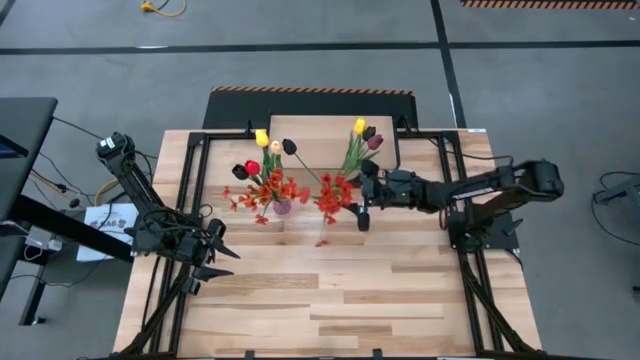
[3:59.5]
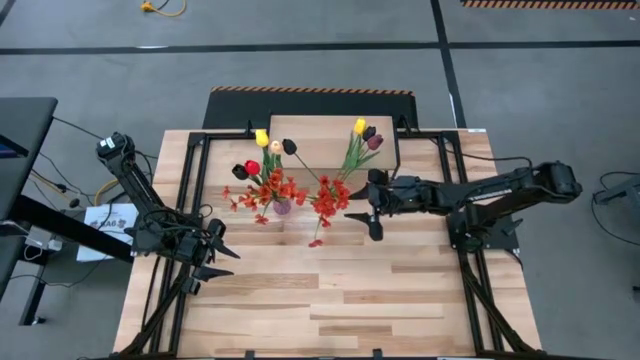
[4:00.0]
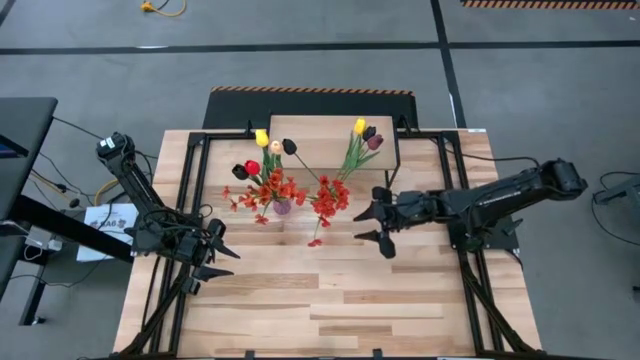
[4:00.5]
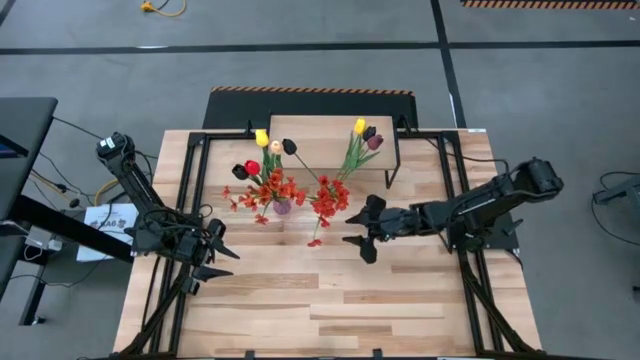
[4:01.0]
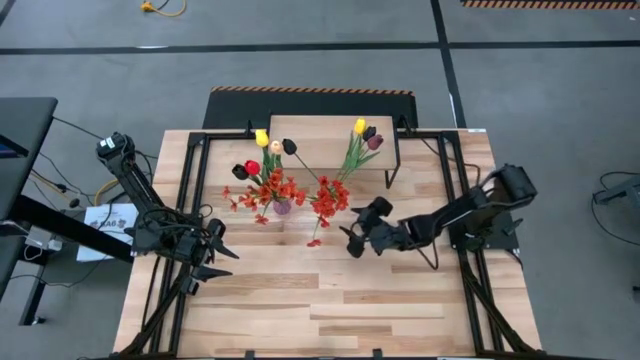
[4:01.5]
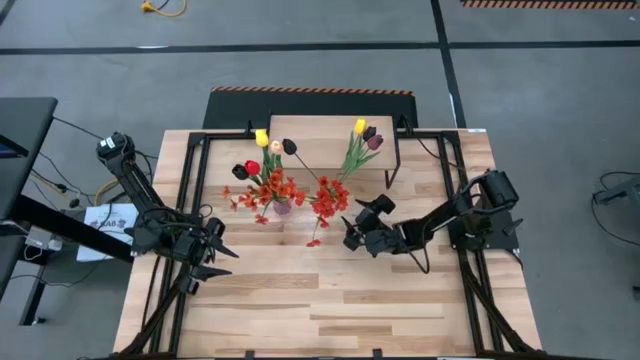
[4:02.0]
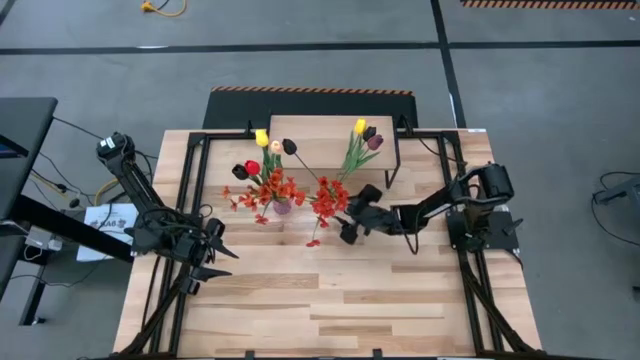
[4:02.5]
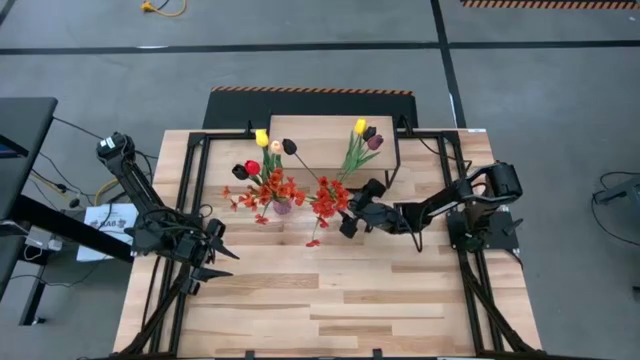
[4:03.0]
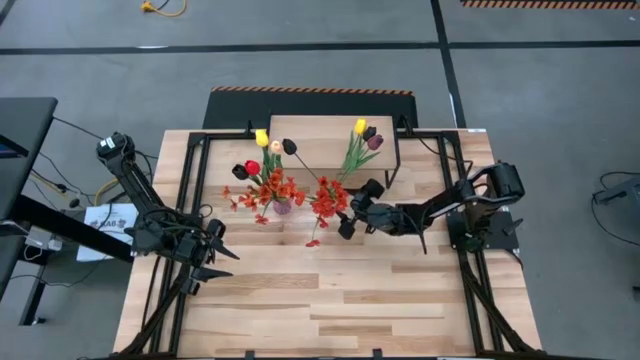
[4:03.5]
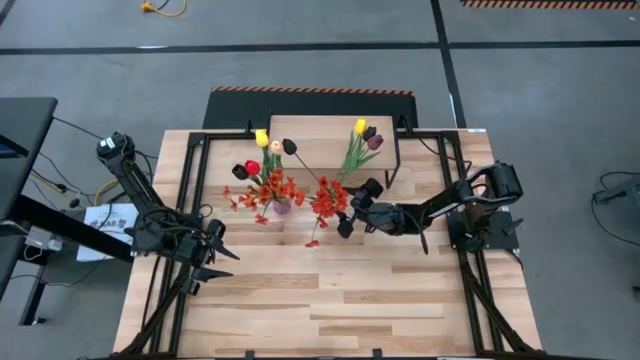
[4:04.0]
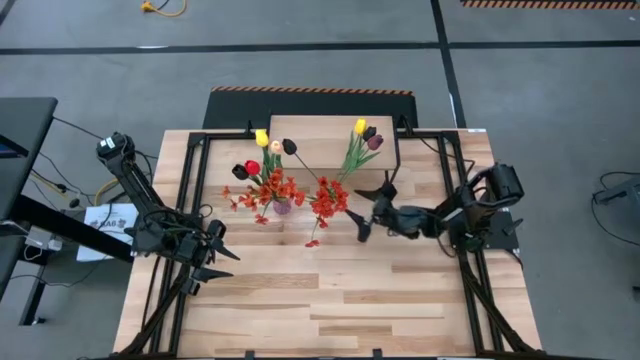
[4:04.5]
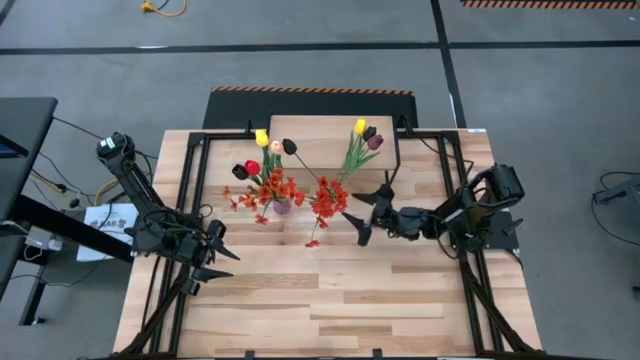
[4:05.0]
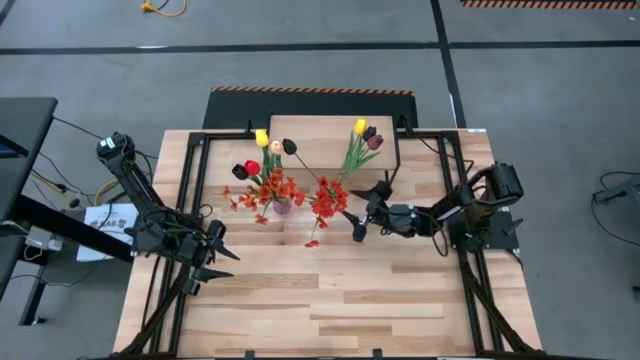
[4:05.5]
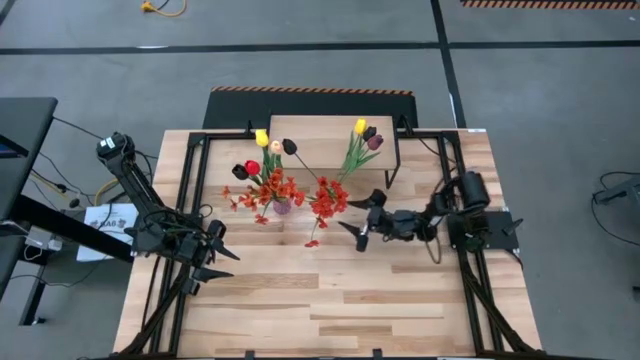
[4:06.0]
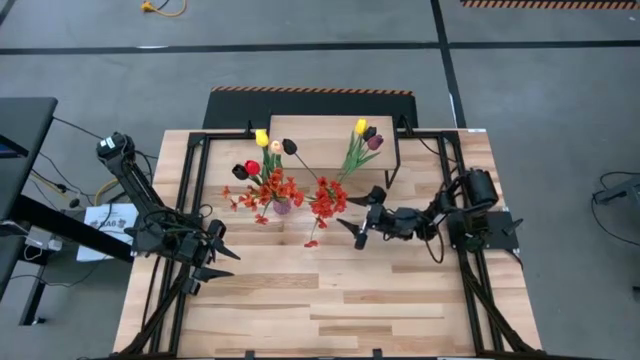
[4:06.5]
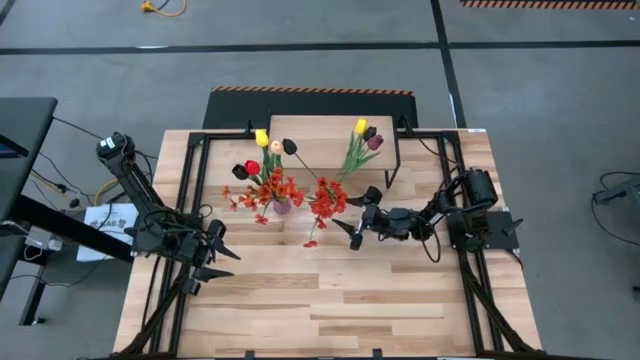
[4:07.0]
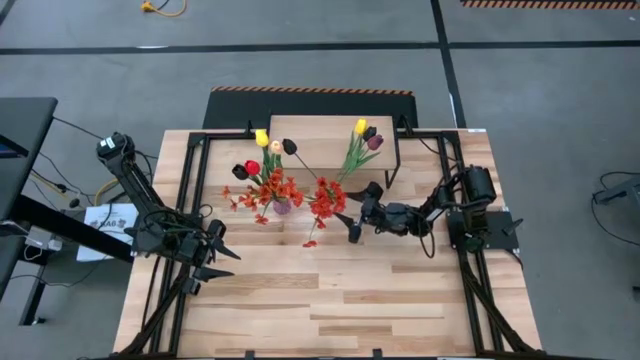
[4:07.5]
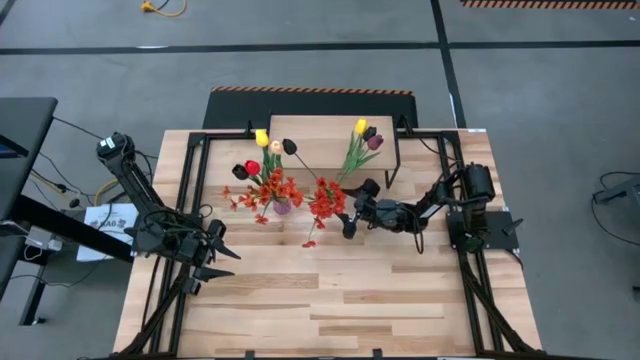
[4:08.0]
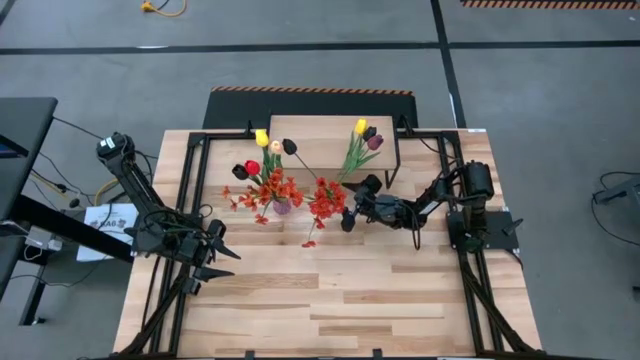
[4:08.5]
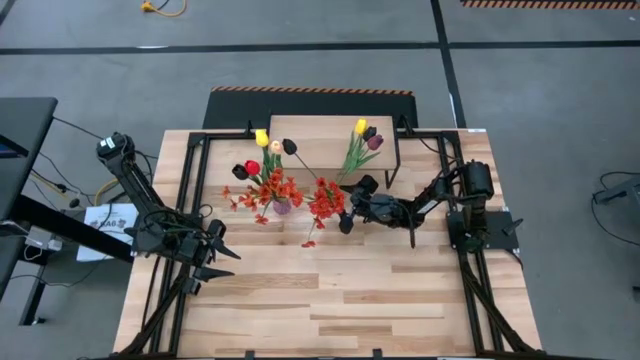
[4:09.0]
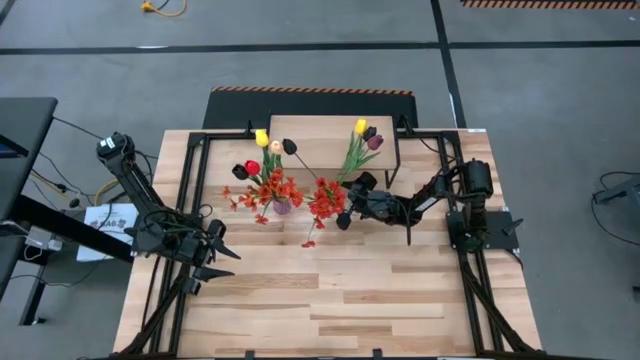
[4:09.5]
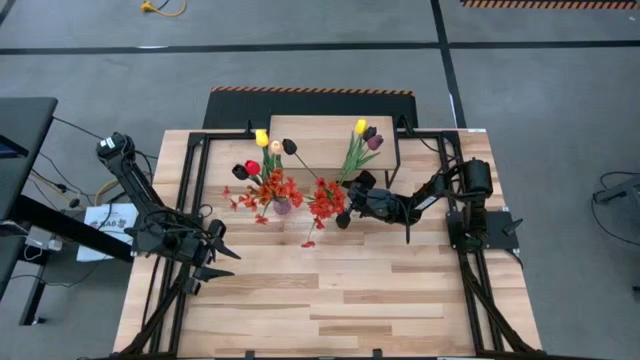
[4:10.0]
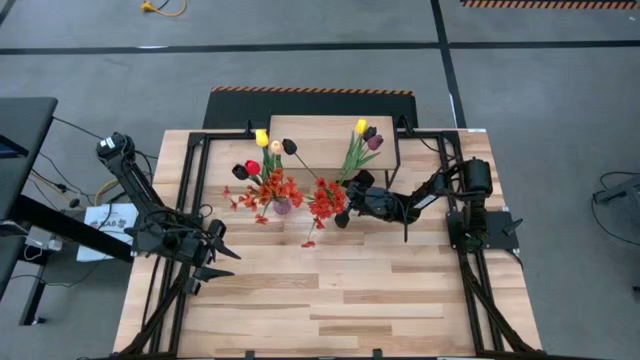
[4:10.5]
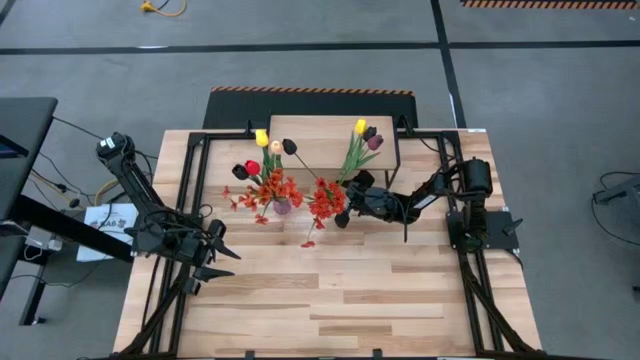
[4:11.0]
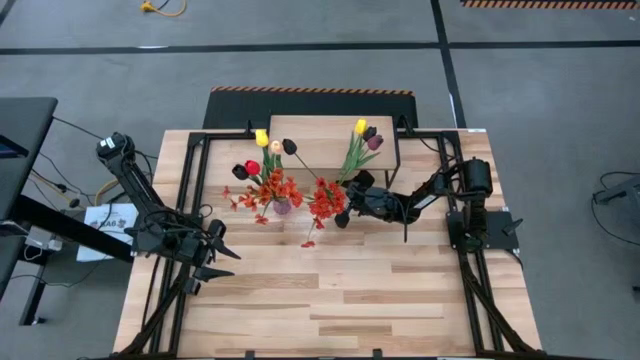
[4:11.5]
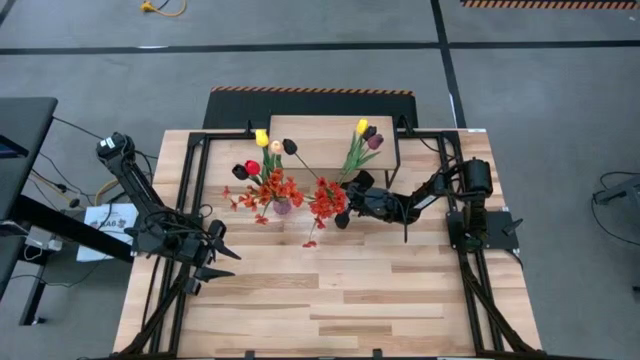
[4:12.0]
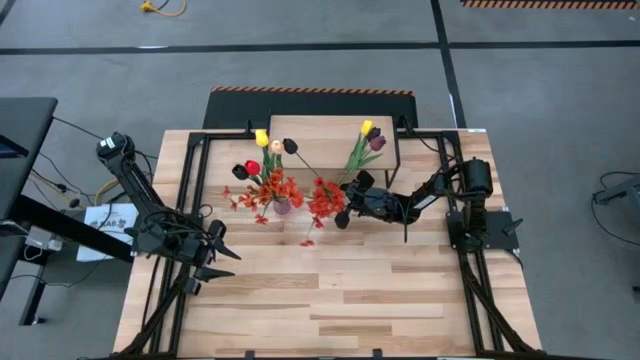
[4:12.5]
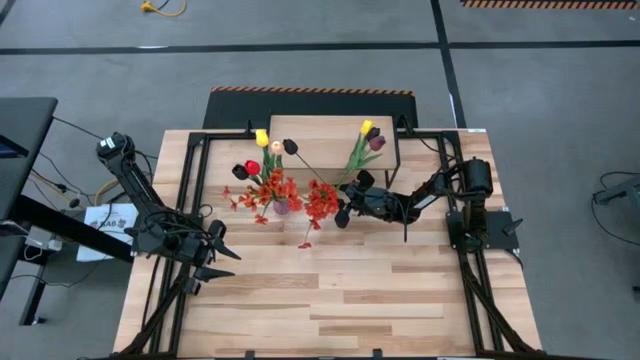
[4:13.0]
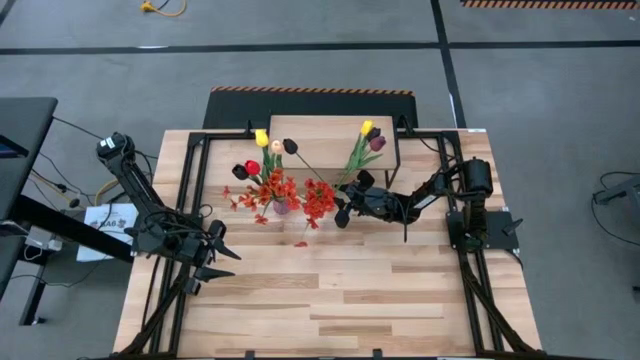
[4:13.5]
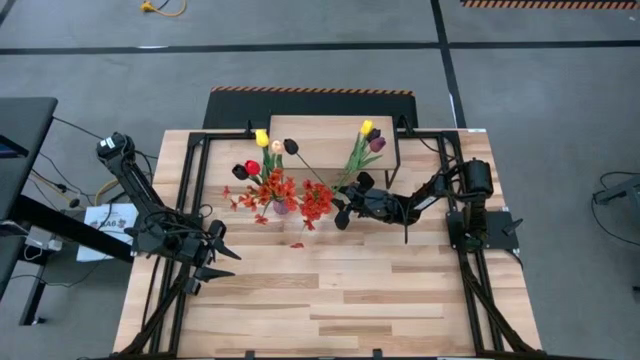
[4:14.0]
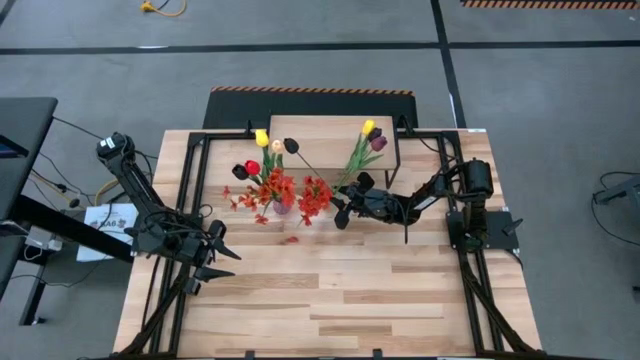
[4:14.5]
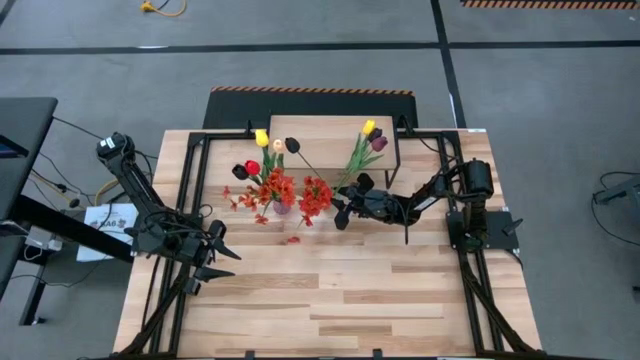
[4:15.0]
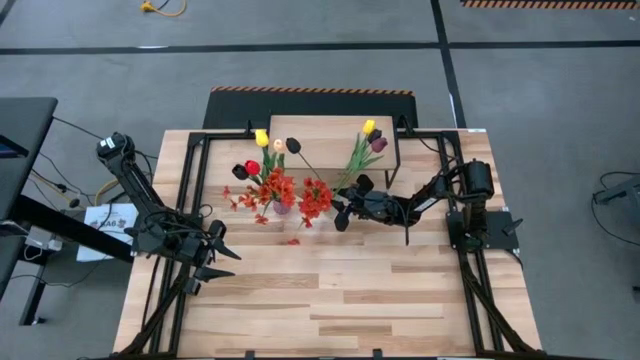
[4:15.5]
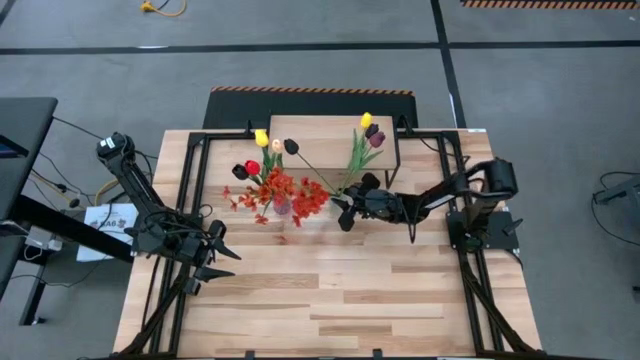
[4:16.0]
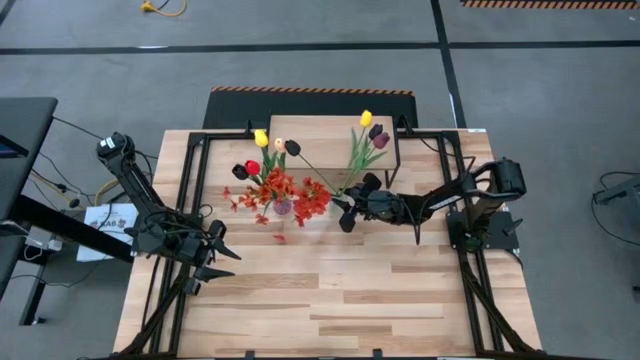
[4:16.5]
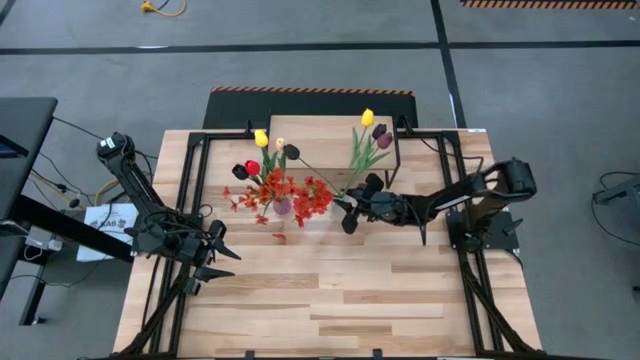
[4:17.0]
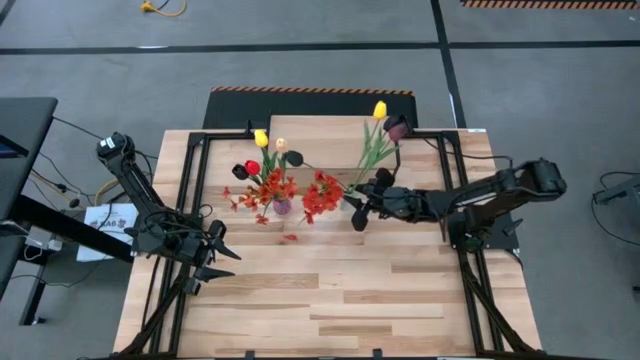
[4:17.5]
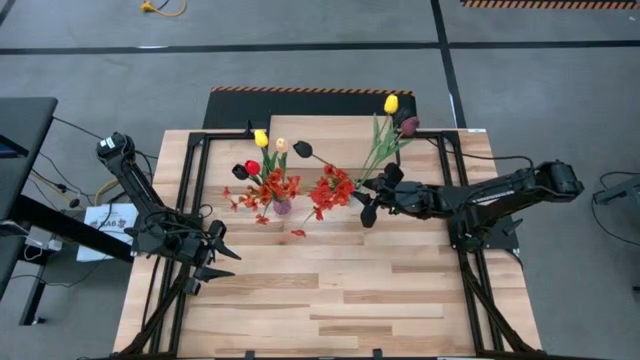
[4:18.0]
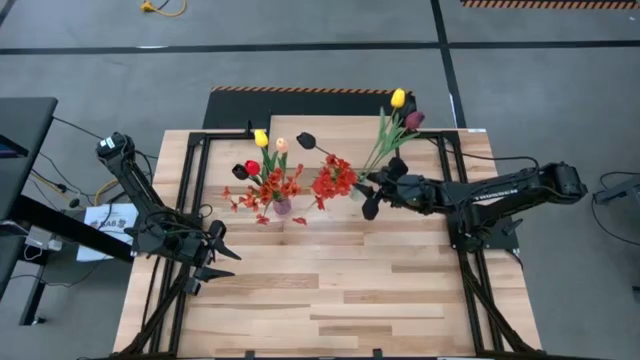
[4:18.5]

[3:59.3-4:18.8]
Task: Pick and place flowers into a vace then onto a shelf
Put the transparent vase with flowers on the shelf
